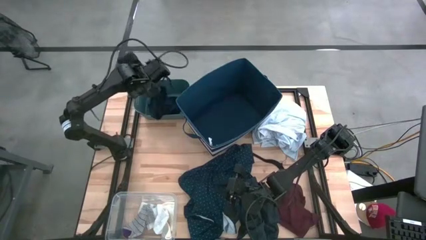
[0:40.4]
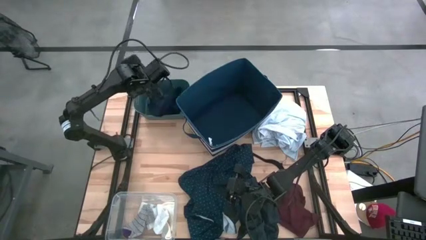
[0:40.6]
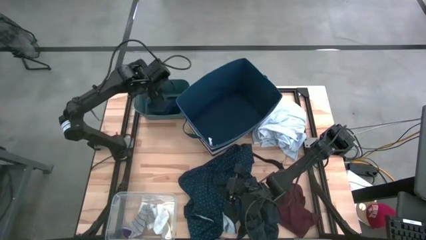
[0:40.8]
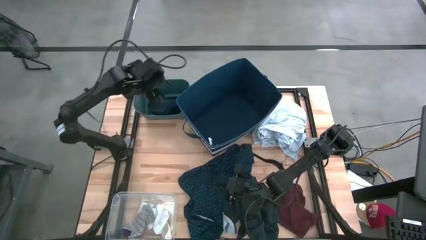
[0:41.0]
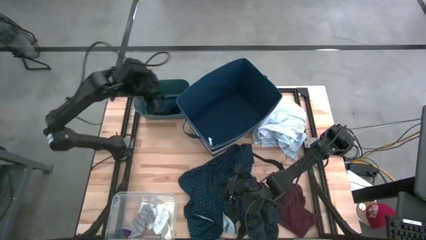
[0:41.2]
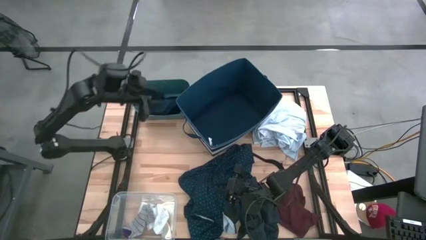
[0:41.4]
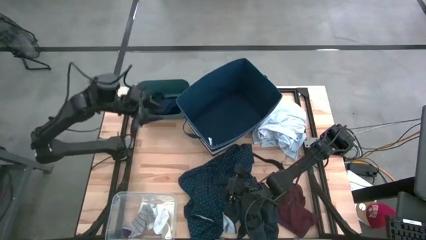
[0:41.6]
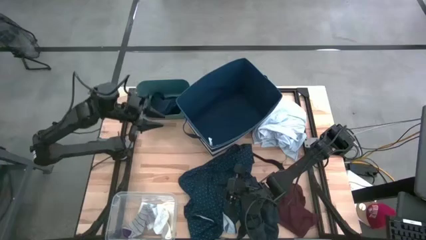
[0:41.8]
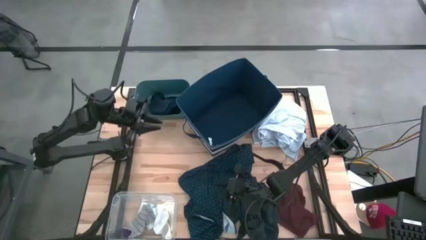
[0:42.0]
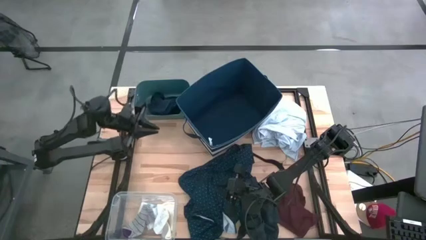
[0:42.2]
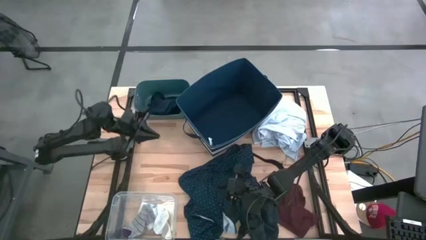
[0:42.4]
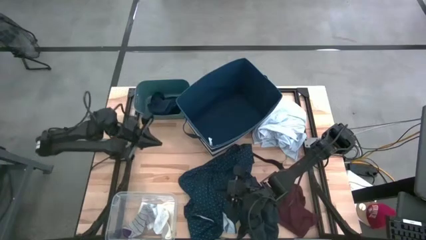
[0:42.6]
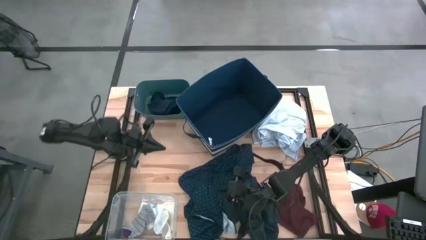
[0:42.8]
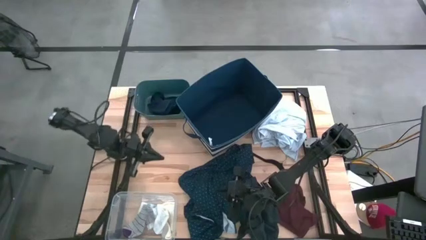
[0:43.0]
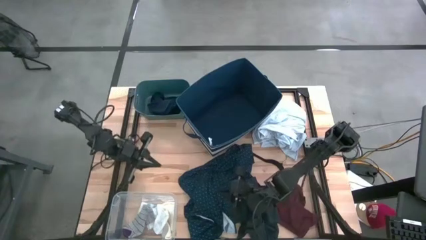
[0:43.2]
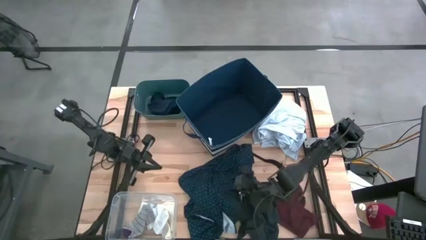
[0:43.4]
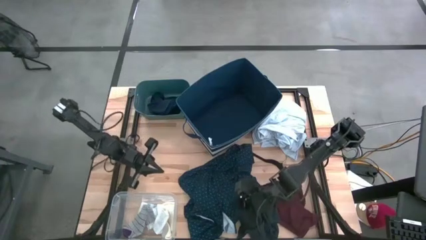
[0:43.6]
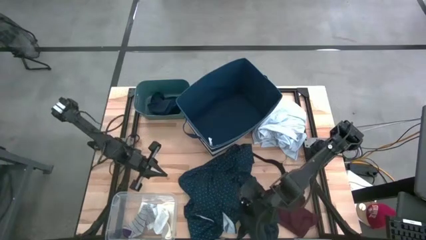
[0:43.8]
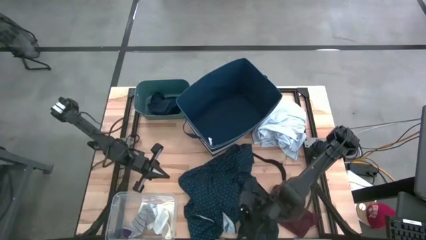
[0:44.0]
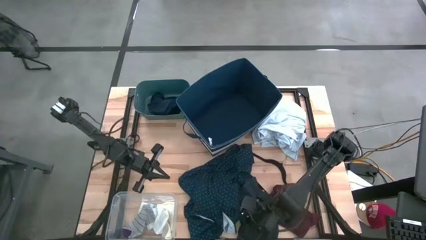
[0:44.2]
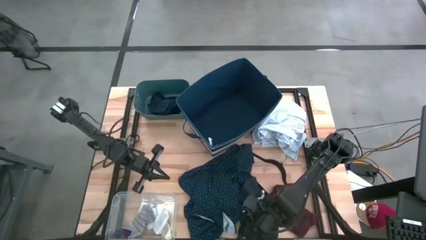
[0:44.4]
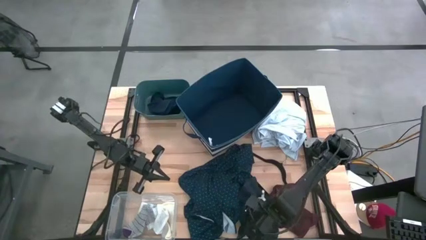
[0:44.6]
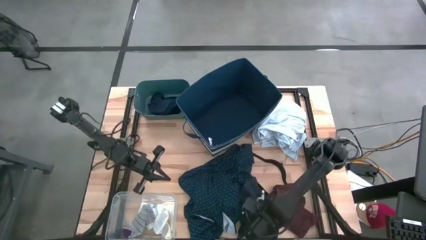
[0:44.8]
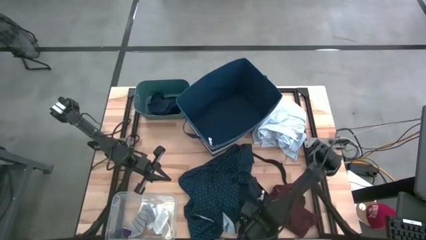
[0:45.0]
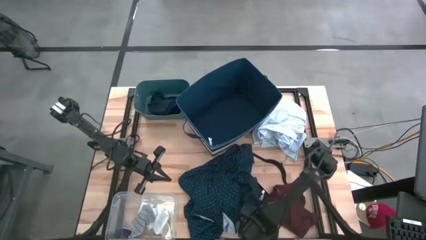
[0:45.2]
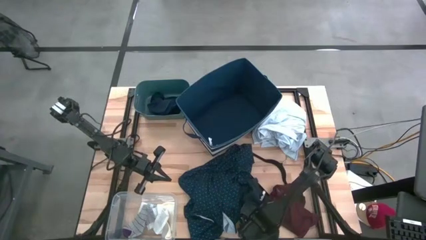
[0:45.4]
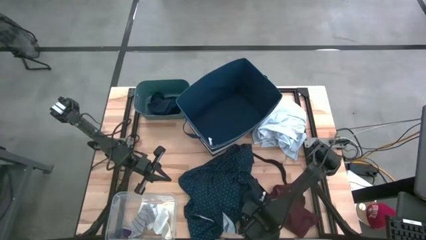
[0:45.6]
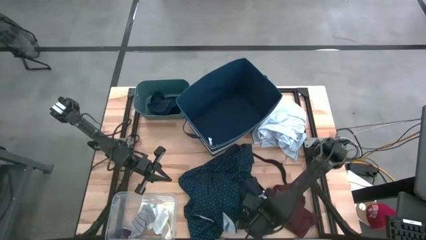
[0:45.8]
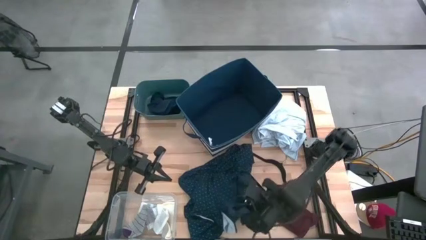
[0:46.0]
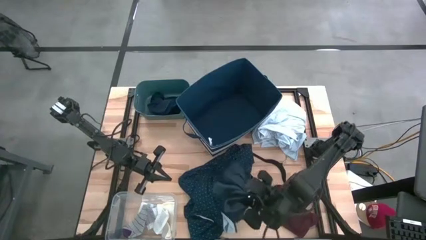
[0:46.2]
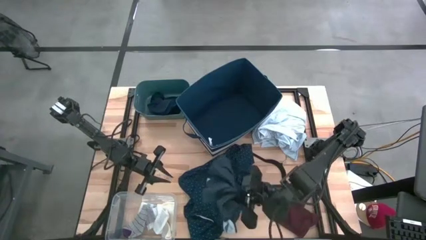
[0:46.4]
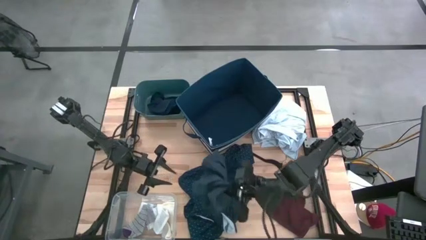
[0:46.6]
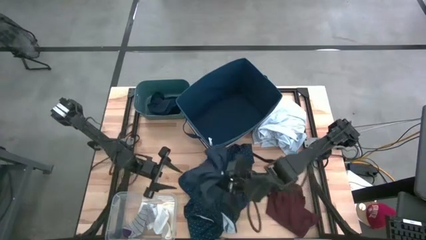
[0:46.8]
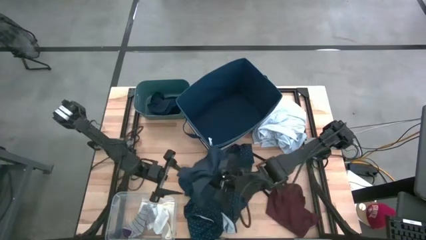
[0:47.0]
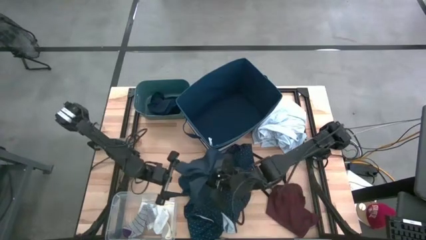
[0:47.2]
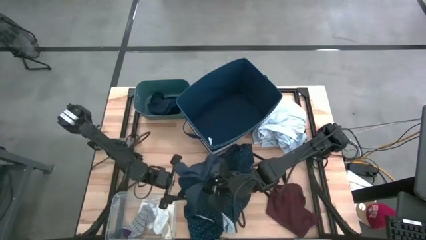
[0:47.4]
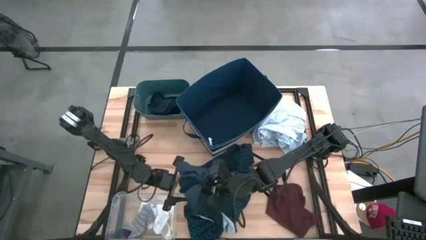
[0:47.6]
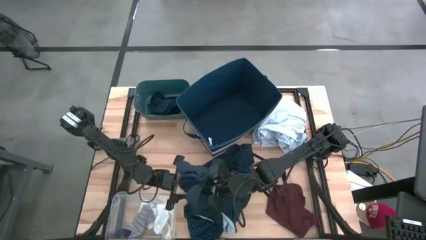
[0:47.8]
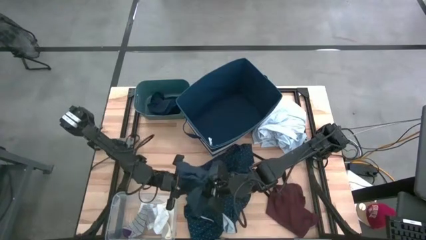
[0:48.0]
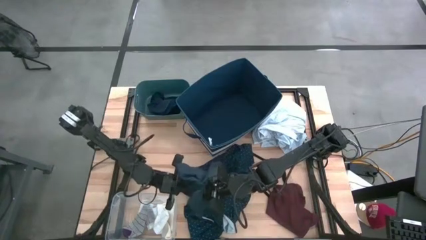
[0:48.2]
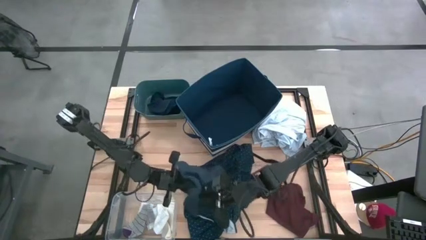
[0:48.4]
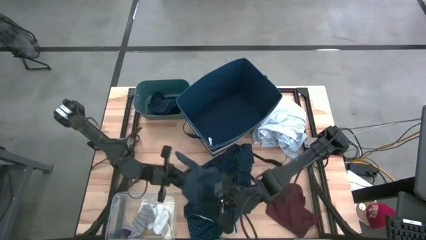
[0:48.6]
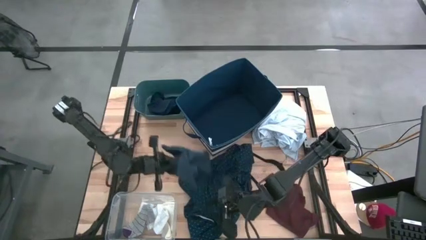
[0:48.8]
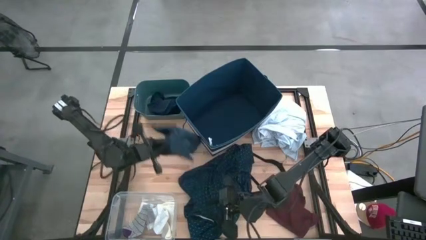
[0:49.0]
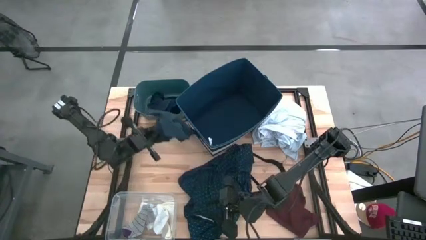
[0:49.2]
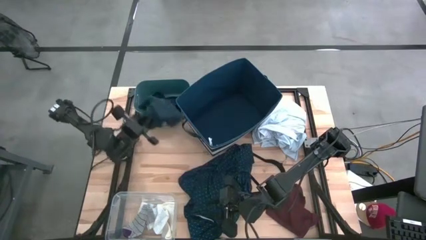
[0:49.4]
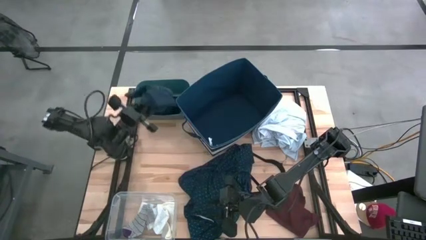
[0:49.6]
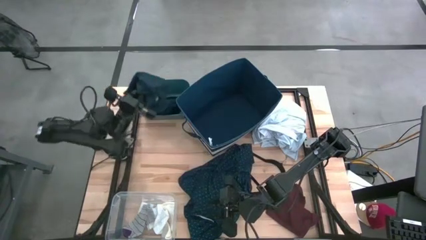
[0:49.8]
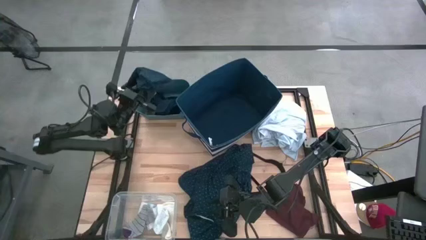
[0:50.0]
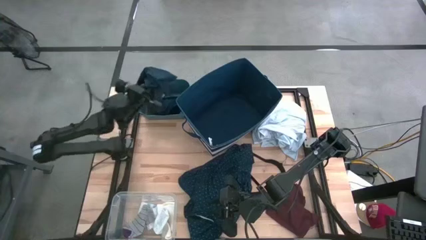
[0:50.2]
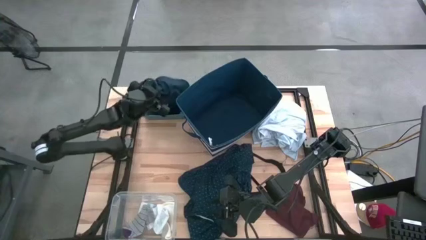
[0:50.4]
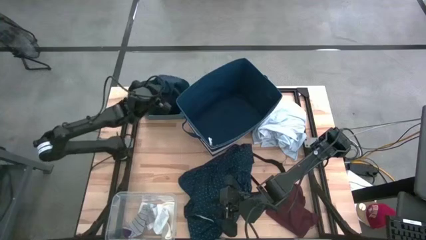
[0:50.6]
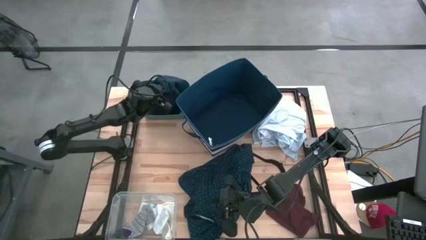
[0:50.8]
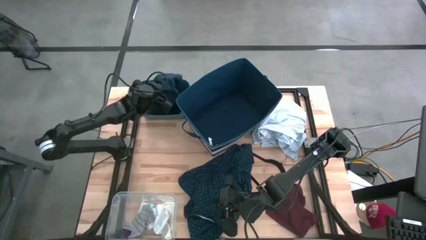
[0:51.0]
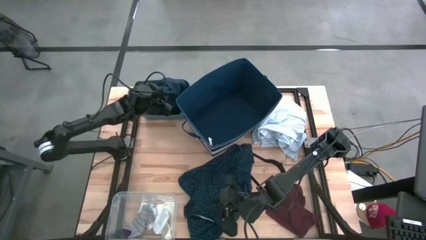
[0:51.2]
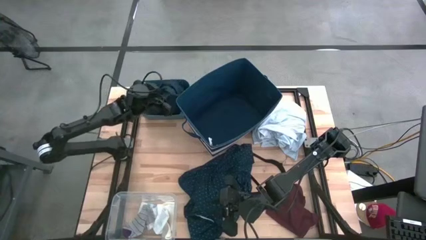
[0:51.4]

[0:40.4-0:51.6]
Task: Pick & Place Cloths
Put the gray underwear into the green bin
